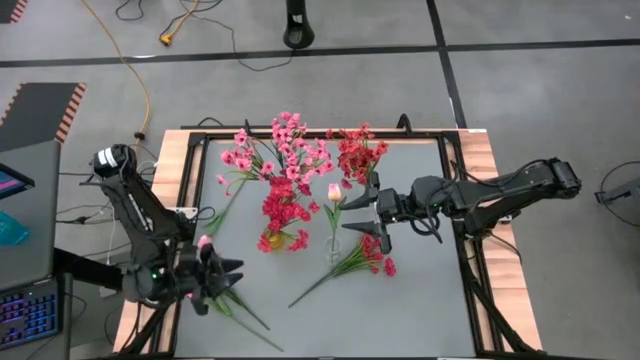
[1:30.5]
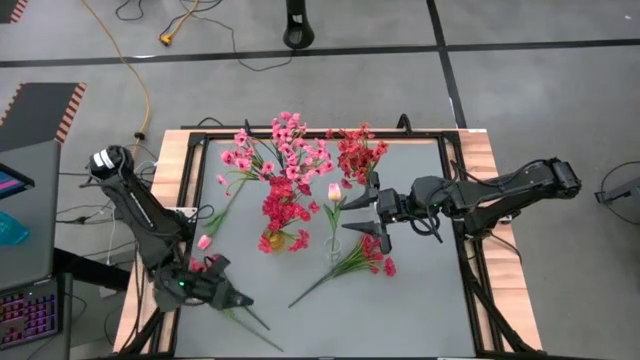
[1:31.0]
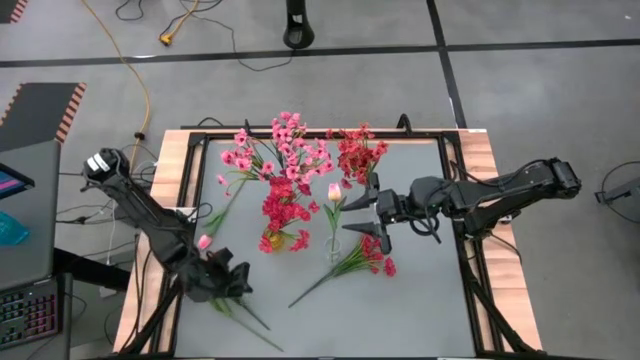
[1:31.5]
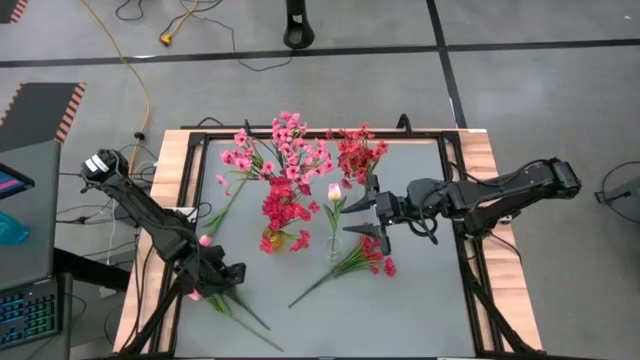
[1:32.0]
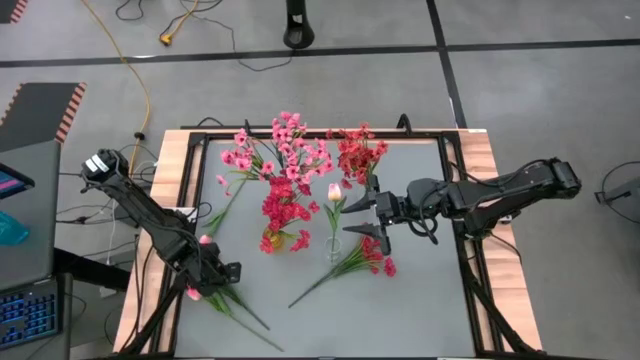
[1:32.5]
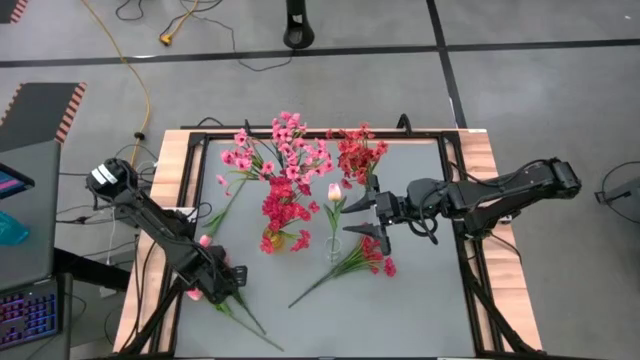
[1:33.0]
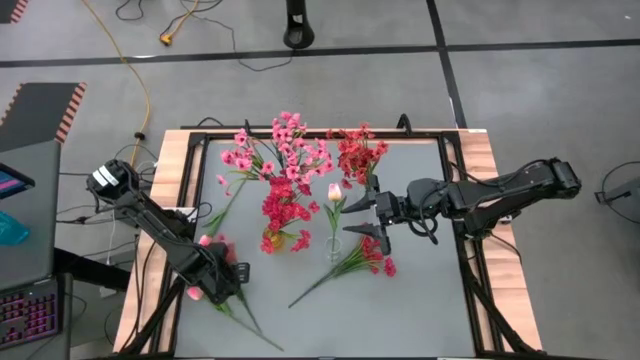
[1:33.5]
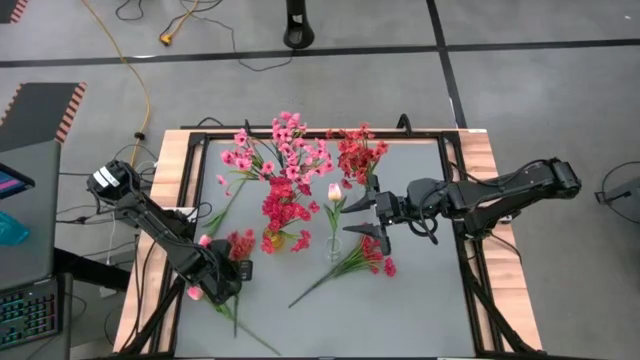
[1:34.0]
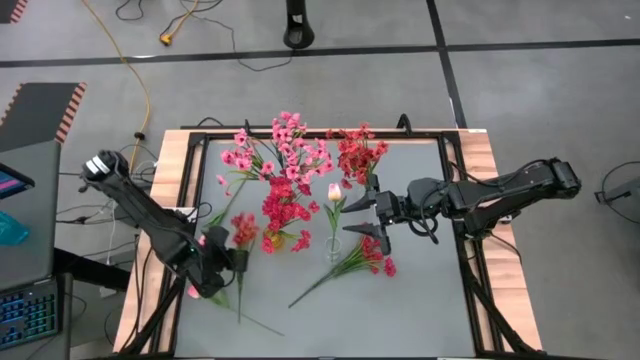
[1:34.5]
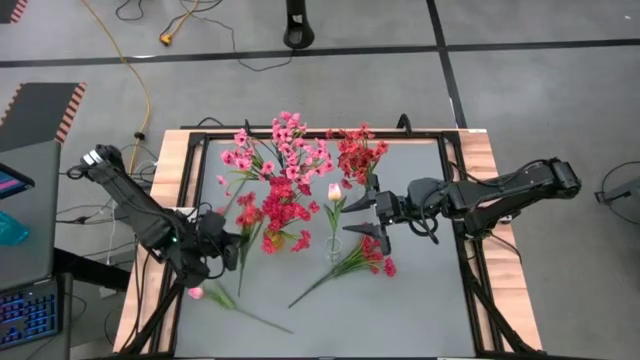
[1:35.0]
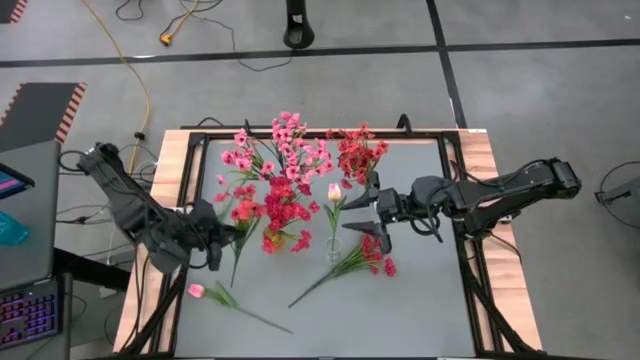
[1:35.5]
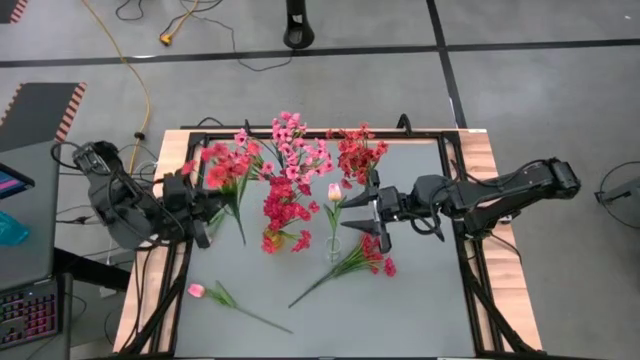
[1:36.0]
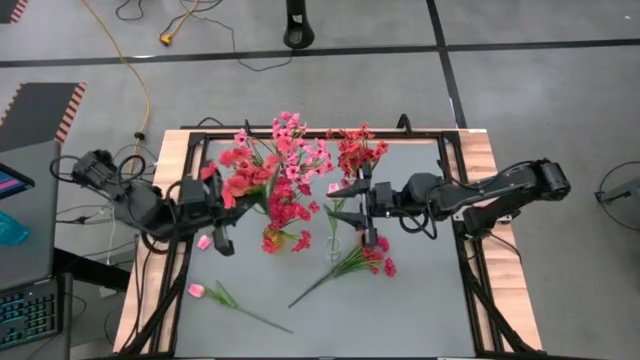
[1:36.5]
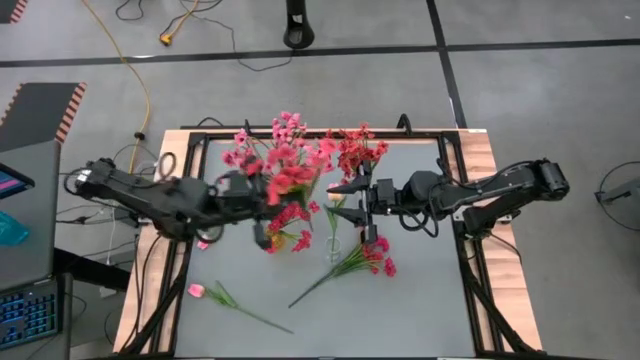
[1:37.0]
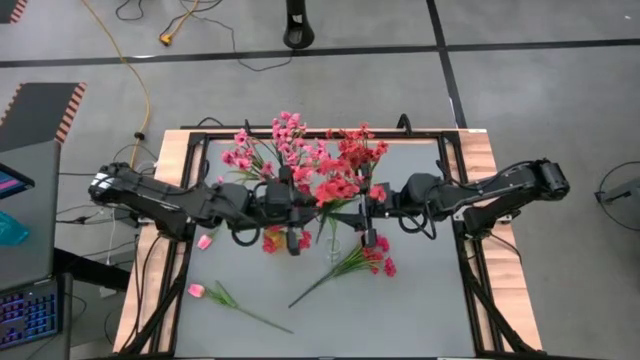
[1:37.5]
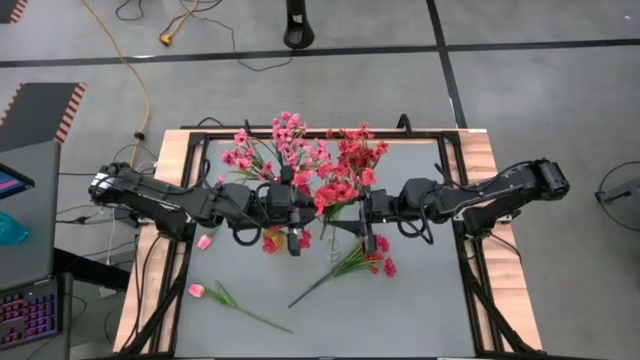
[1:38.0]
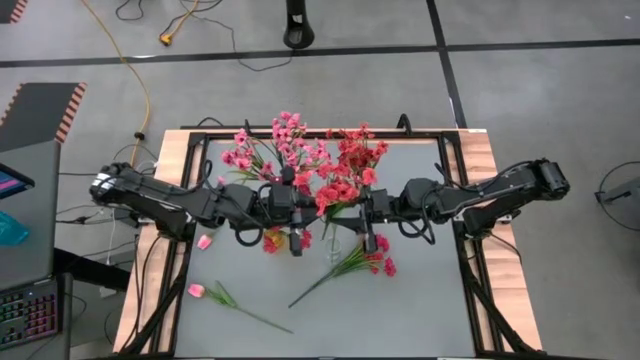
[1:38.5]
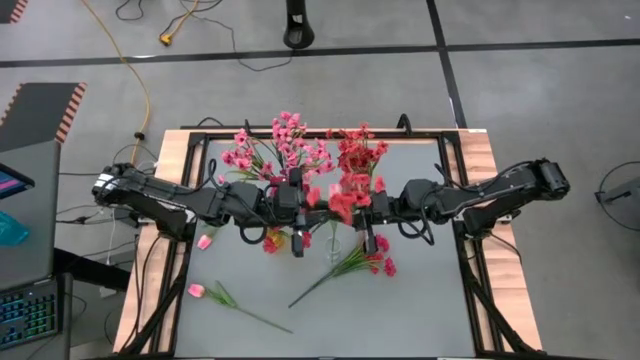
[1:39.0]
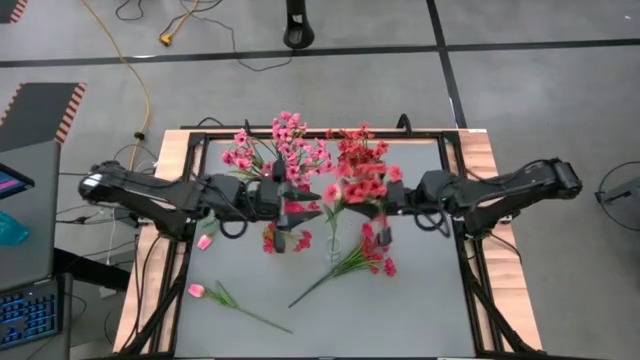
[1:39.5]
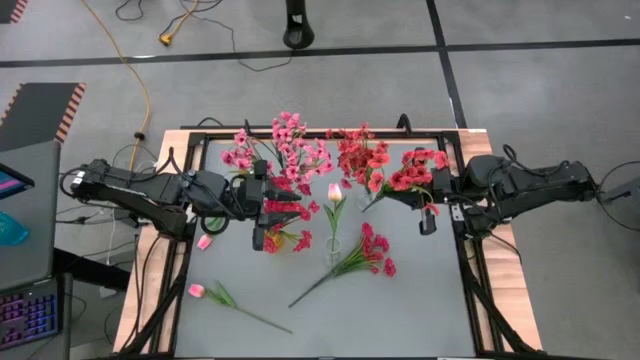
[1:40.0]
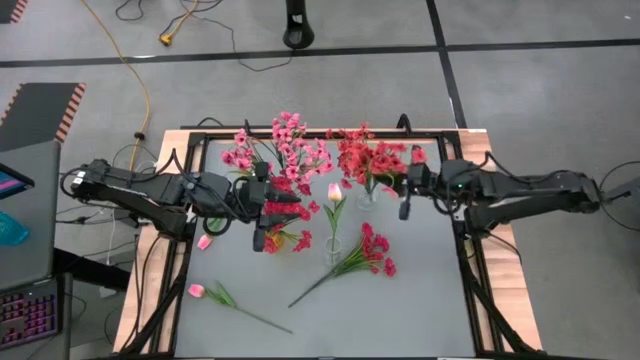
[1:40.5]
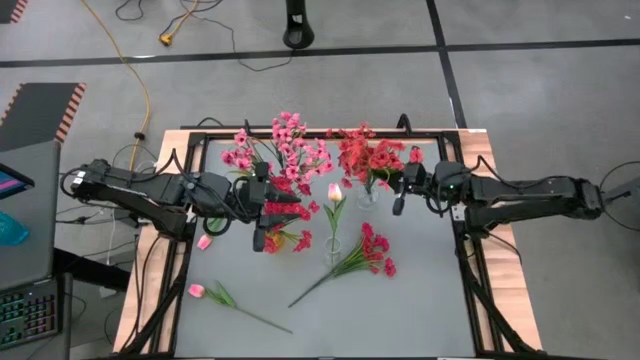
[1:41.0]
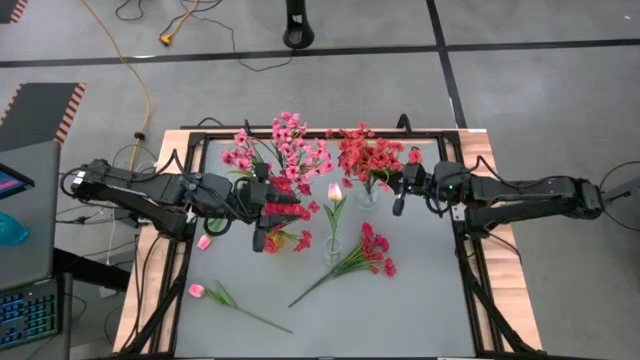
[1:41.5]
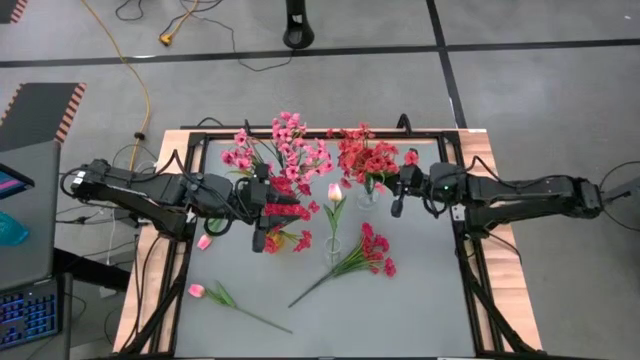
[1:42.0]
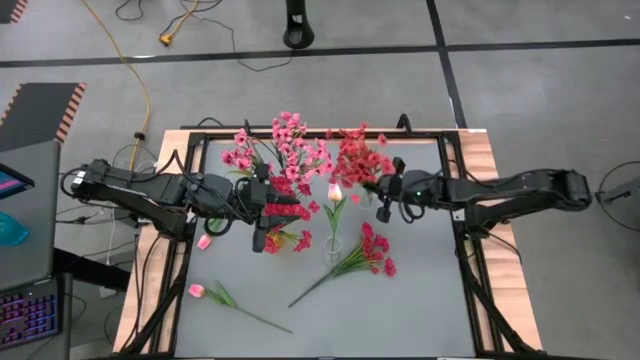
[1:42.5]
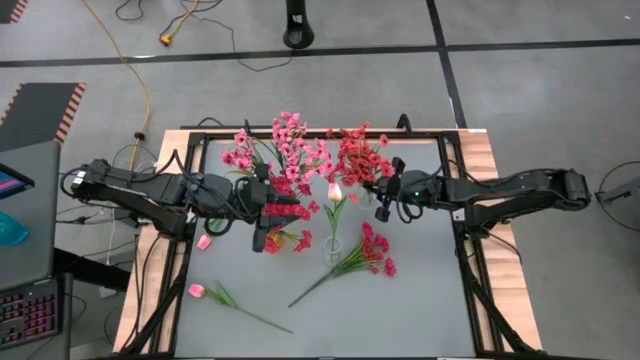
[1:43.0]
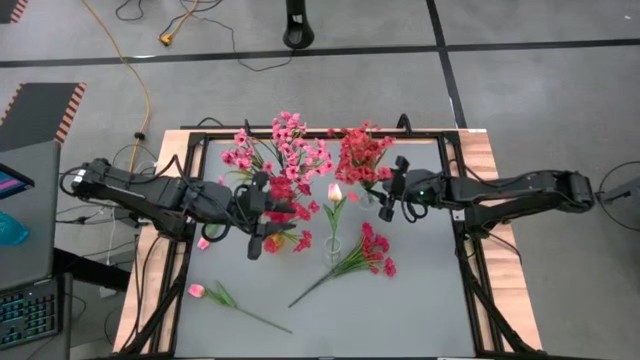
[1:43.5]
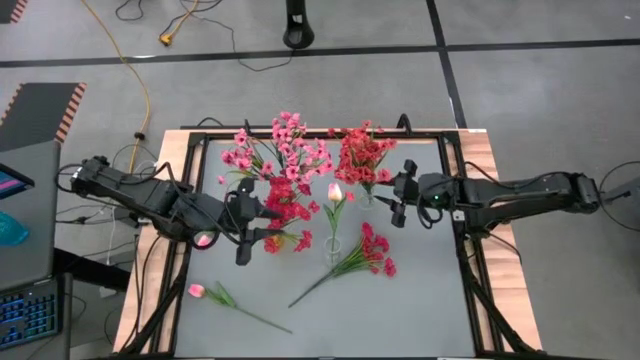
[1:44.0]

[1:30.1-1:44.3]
Task: Sort flowers into vase by color
Put the orange flowers into the top right transparent vase

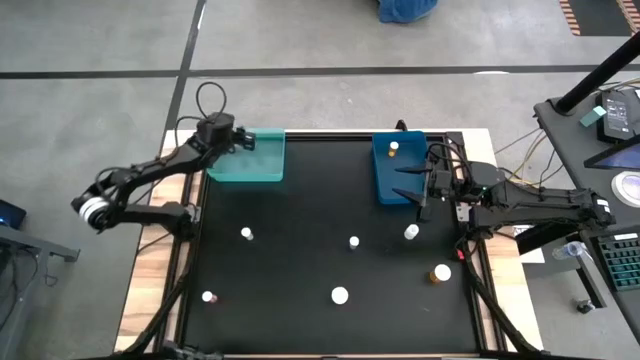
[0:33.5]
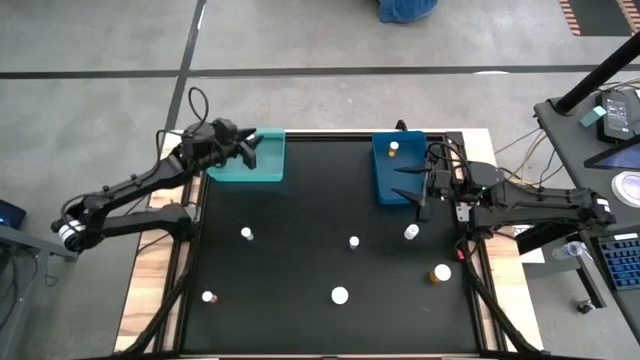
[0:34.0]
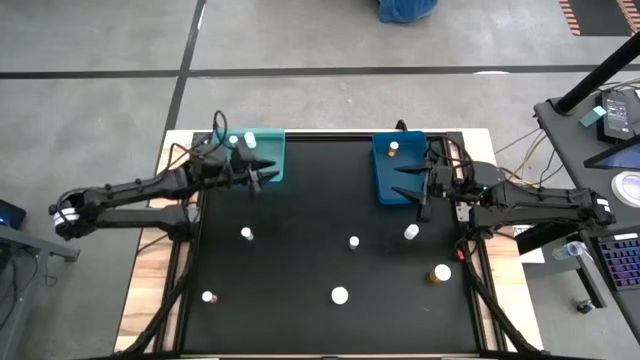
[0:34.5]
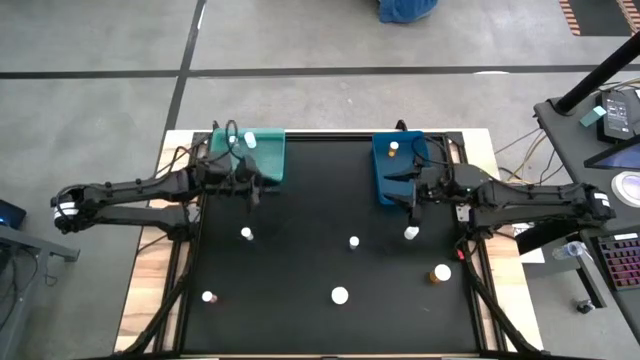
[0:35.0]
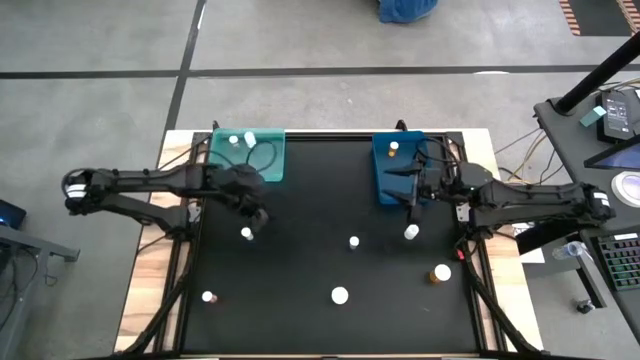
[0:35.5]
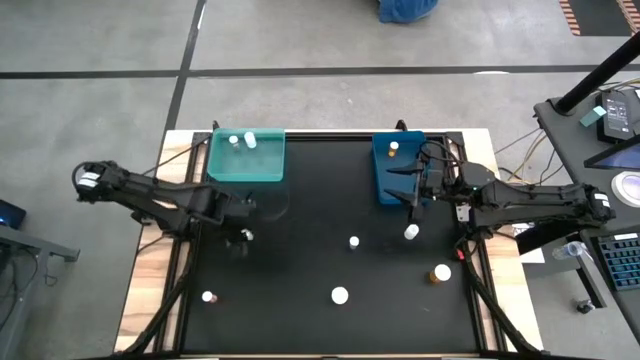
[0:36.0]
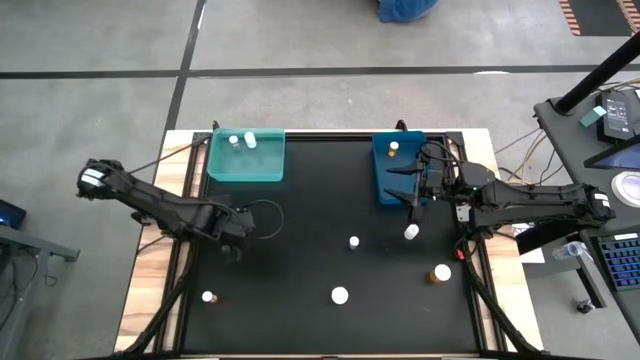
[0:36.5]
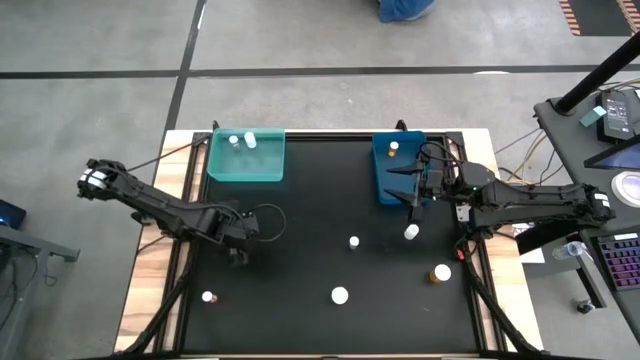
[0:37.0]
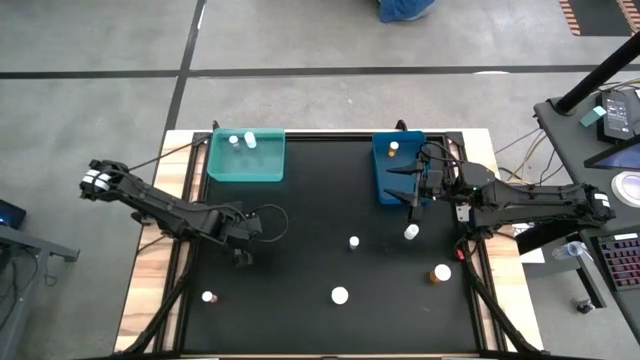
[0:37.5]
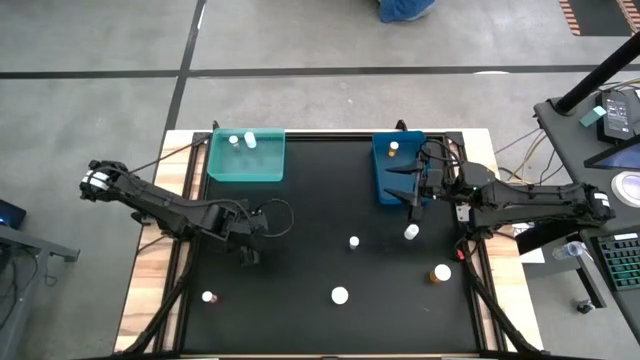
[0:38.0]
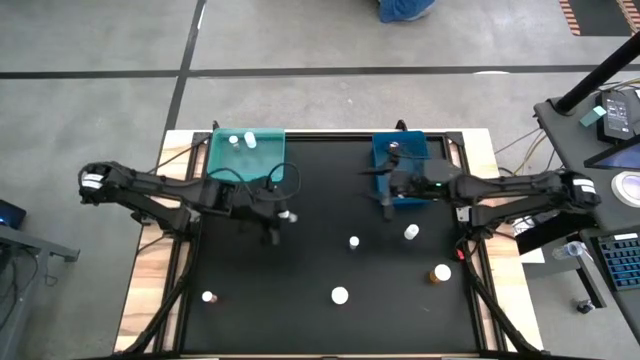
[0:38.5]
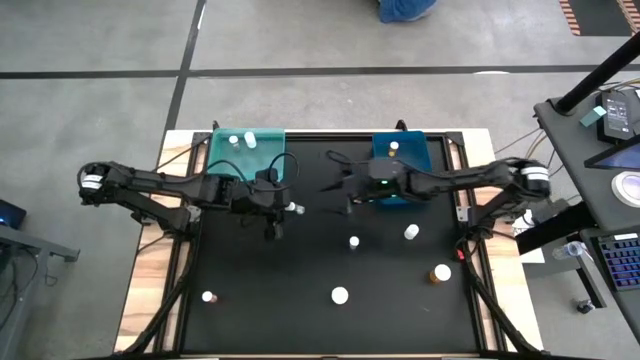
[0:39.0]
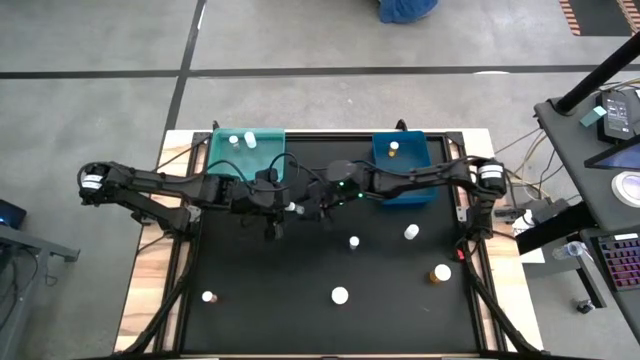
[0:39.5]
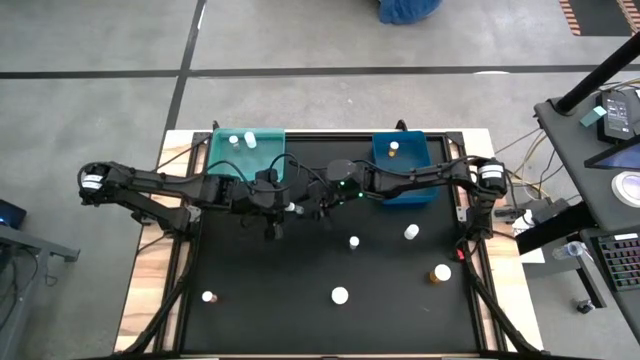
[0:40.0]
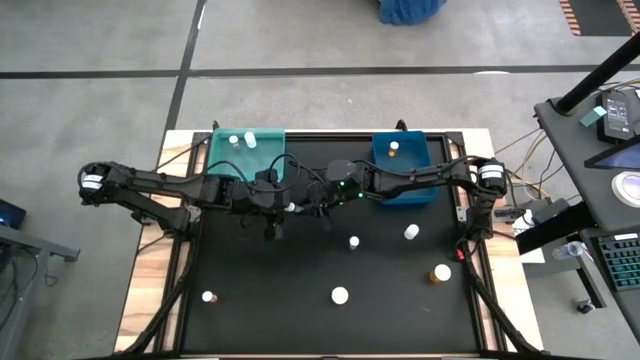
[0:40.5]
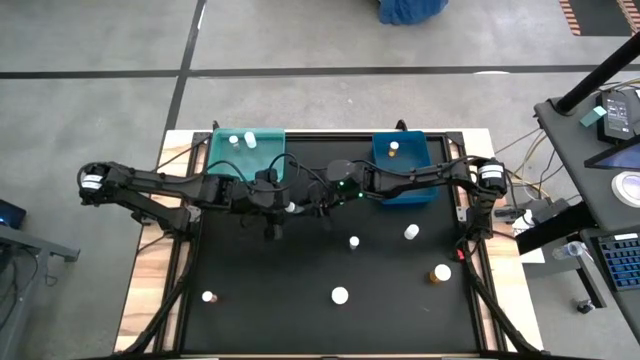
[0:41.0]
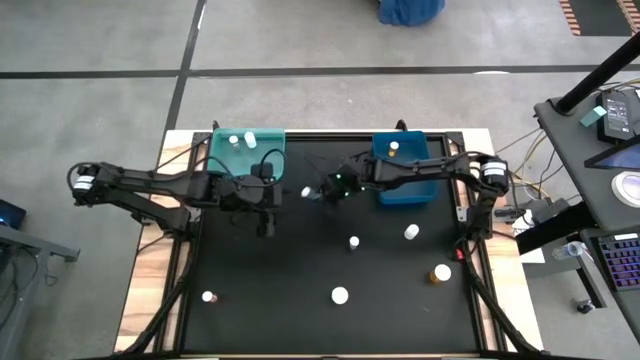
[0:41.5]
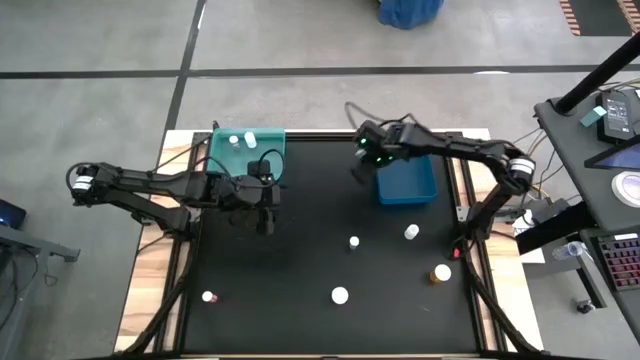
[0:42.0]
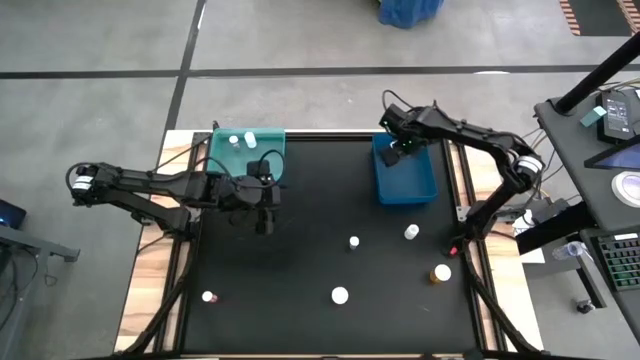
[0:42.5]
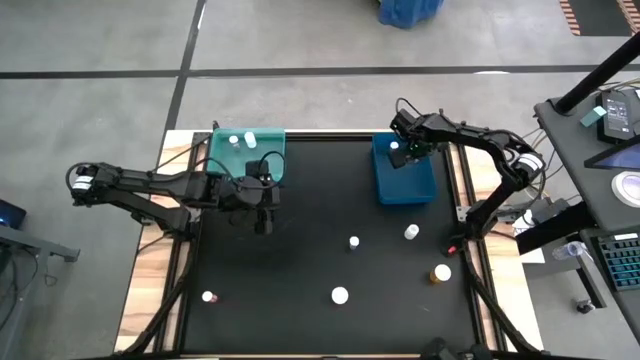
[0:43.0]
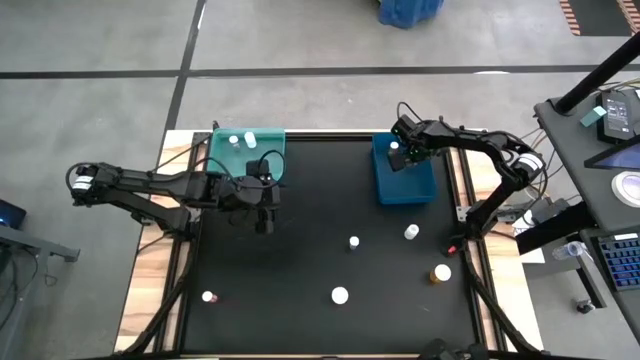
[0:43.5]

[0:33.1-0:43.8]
Task: Pick and place medicine bottles into bin by pill shape (circle, oval)
Put the blue tablet bottle into the blue bin
